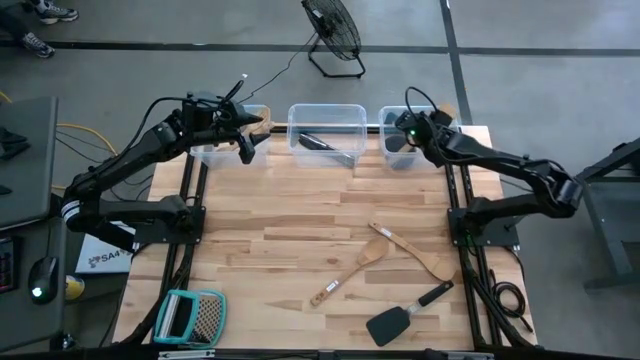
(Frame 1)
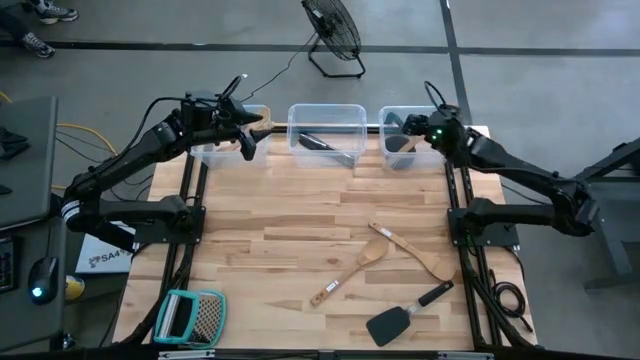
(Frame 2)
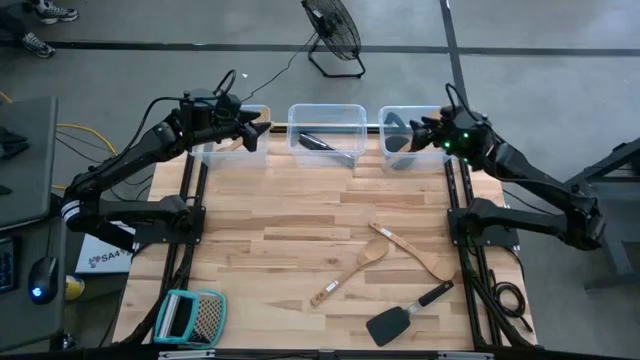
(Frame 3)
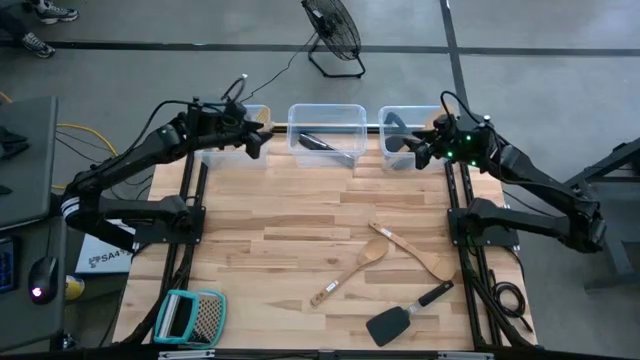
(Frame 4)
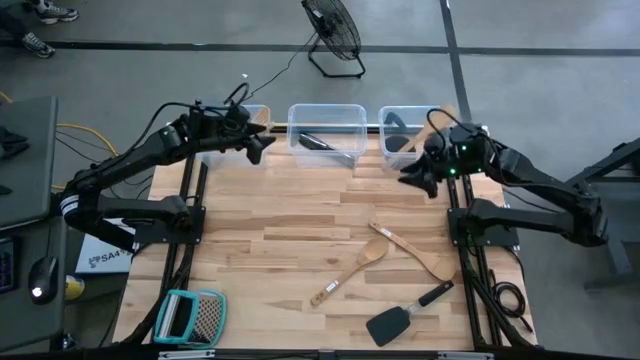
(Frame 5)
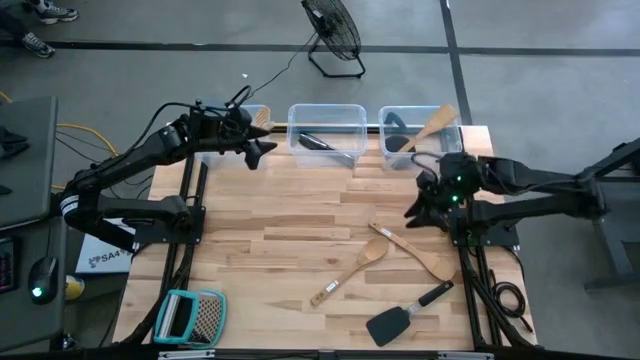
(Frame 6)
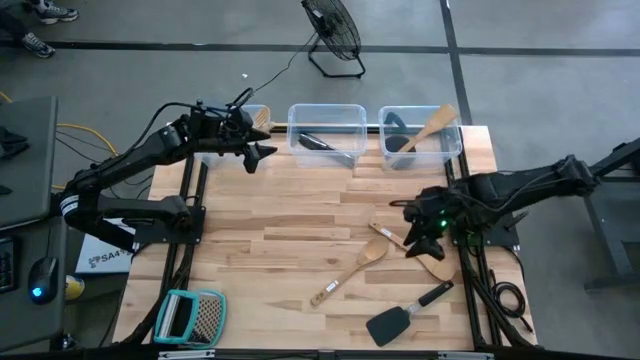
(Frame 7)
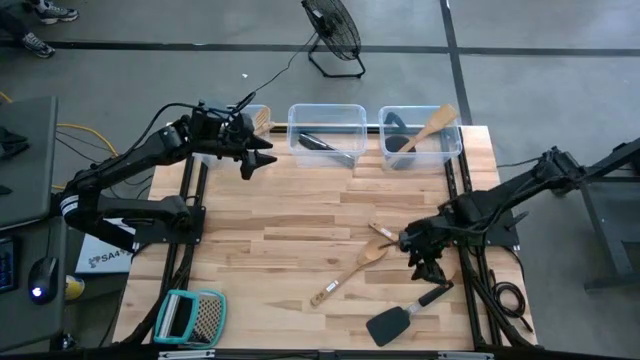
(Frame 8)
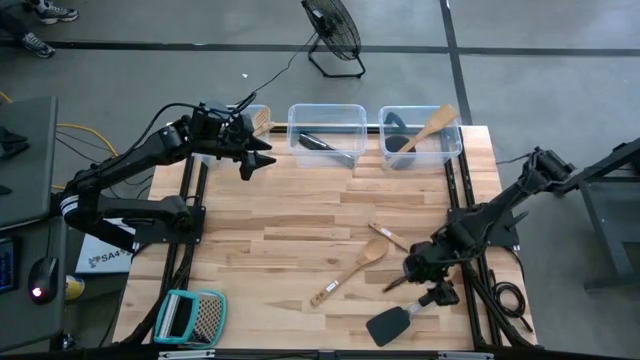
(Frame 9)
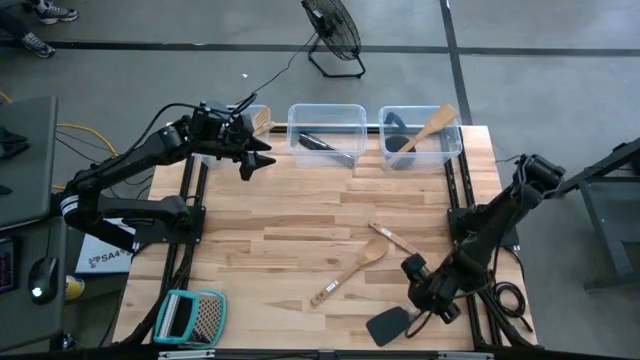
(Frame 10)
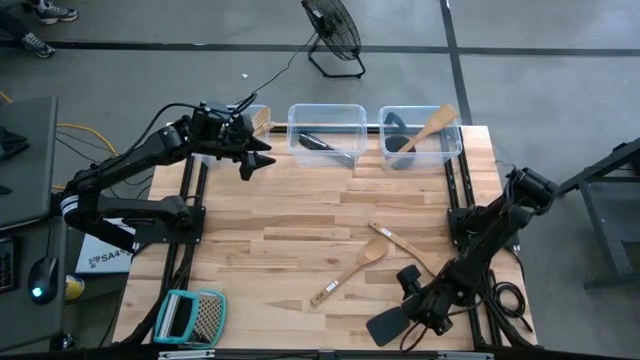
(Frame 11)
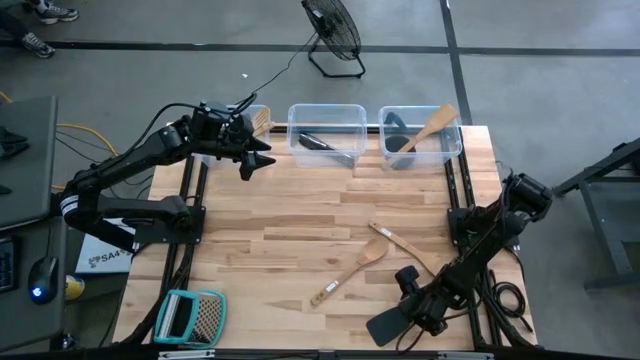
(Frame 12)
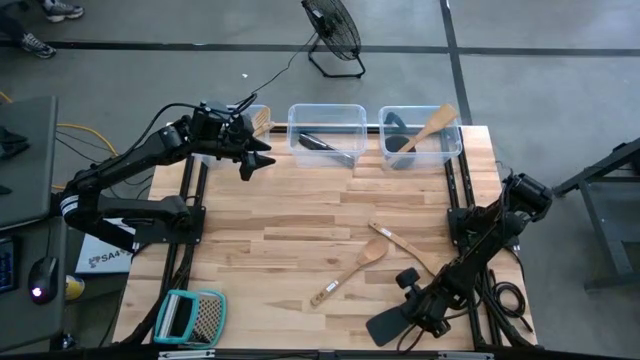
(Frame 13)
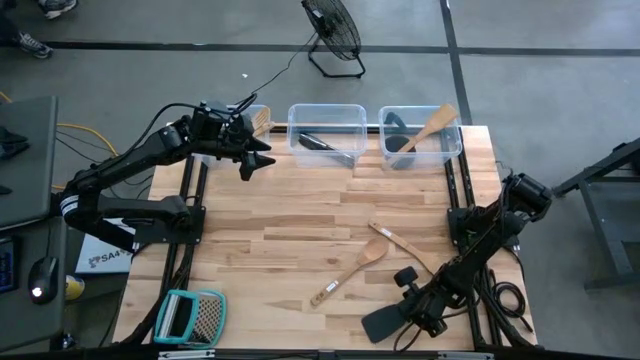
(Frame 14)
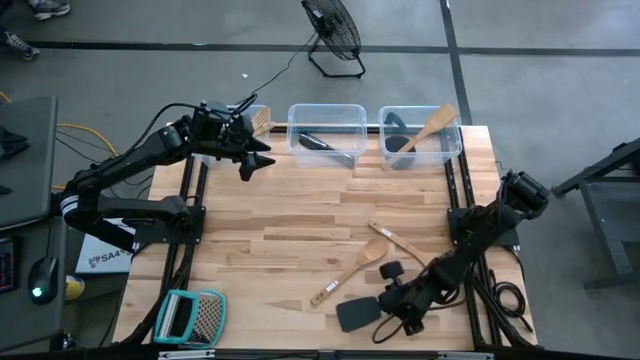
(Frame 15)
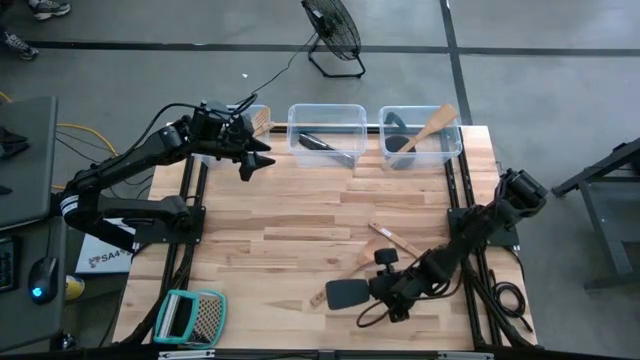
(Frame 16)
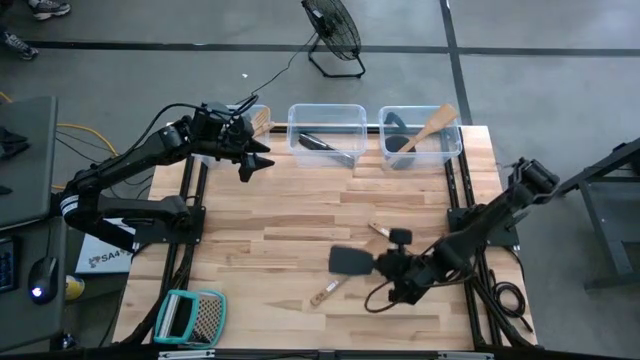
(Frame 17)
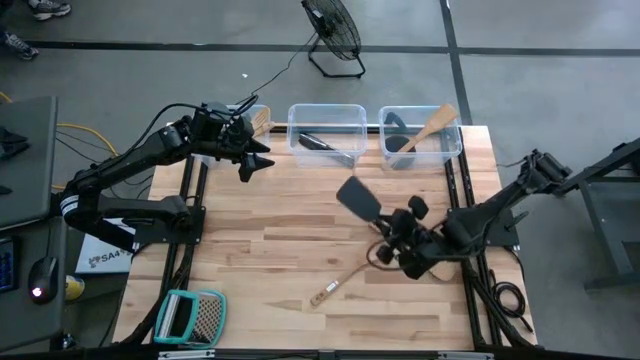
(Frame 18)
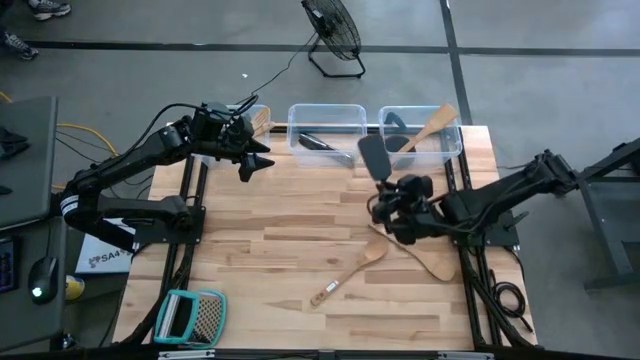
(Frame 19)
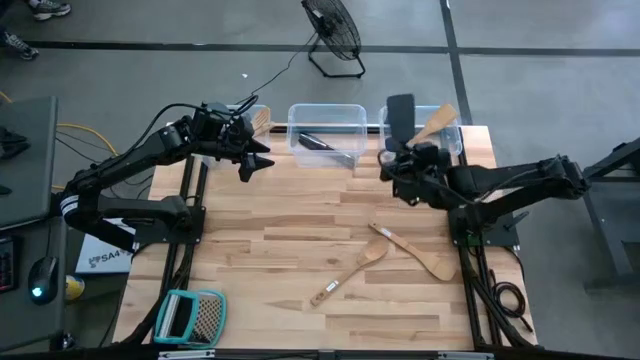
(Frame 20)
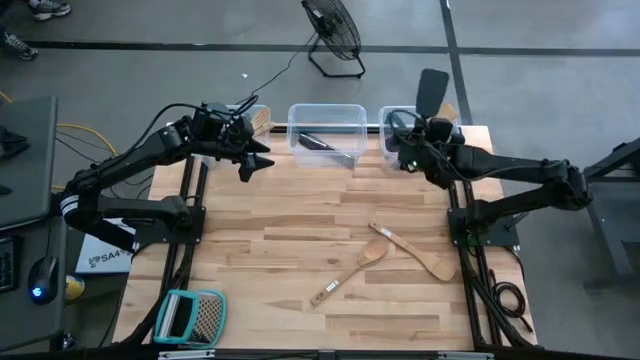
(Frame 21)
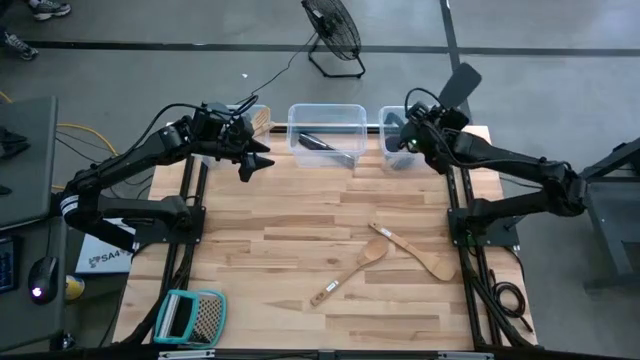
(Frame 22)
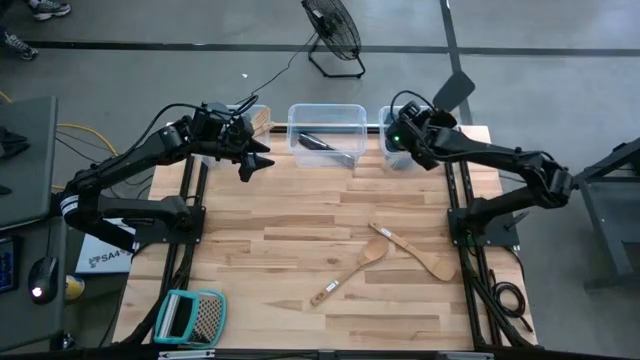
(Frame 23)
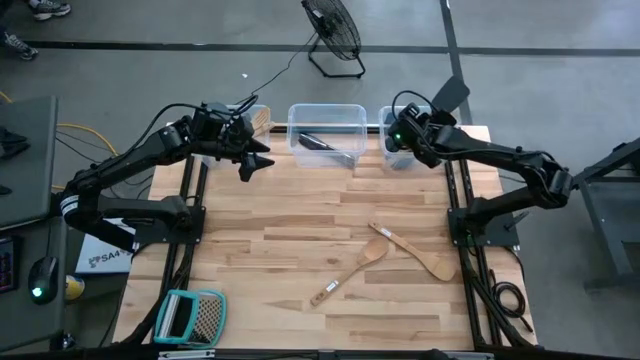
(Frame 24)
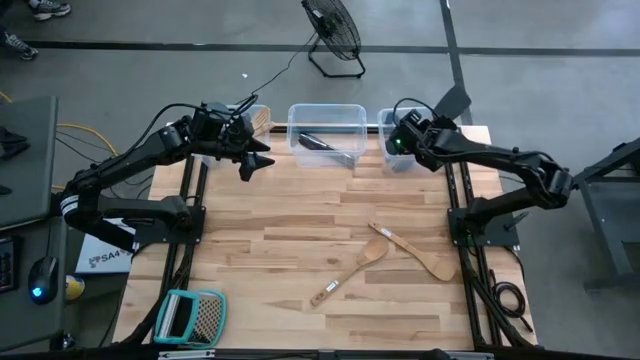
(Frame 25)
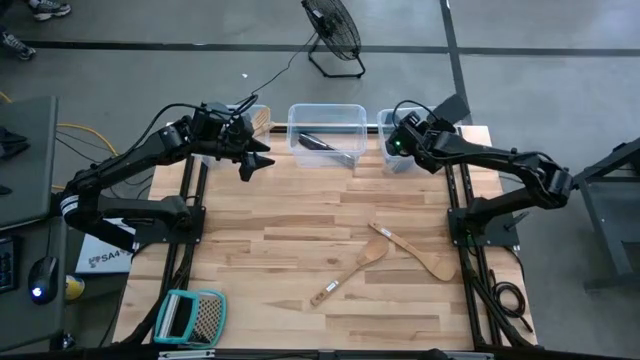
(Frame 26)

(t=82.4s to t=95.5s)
Task: Pick & Place Kitchen Items
Put the black spatula into the right transparent bin

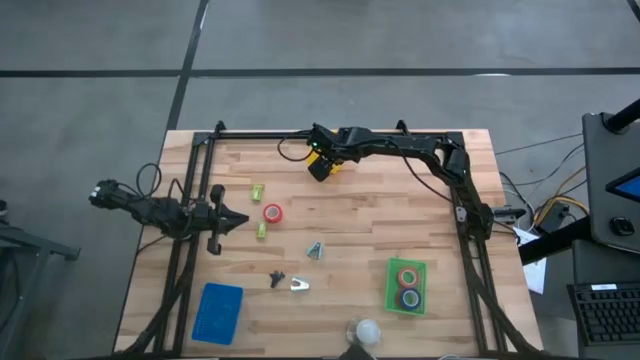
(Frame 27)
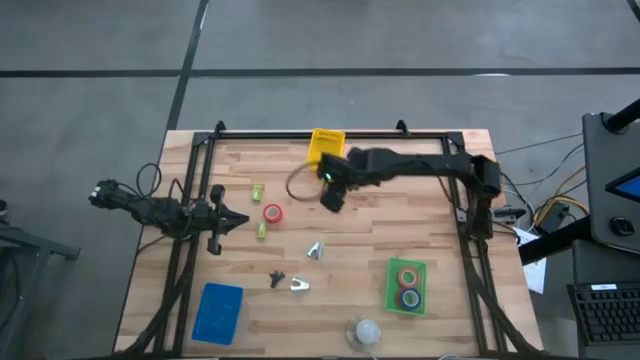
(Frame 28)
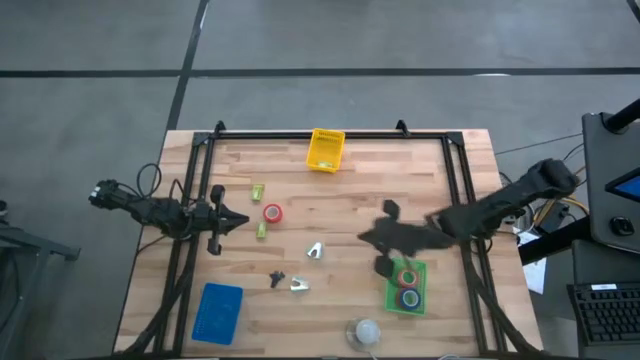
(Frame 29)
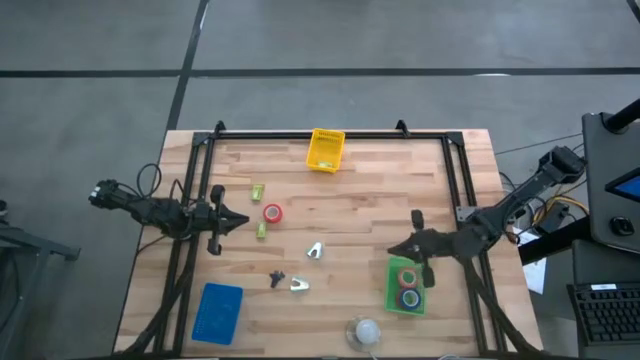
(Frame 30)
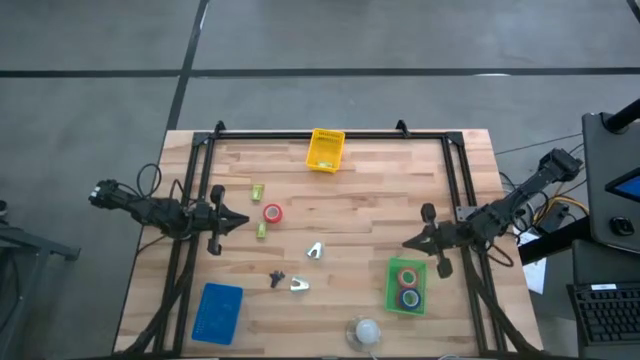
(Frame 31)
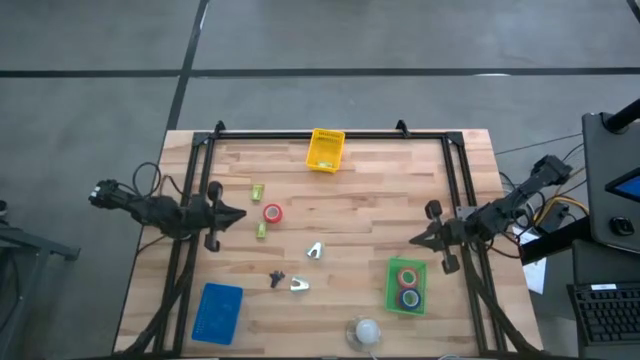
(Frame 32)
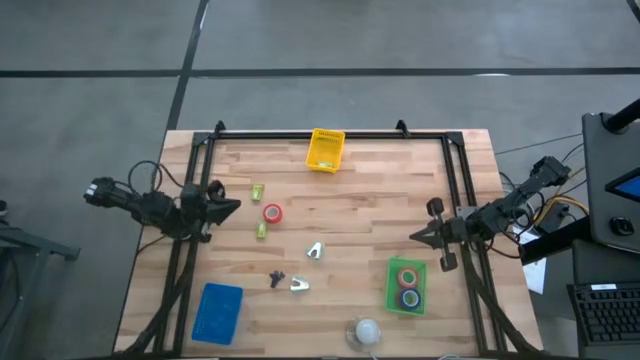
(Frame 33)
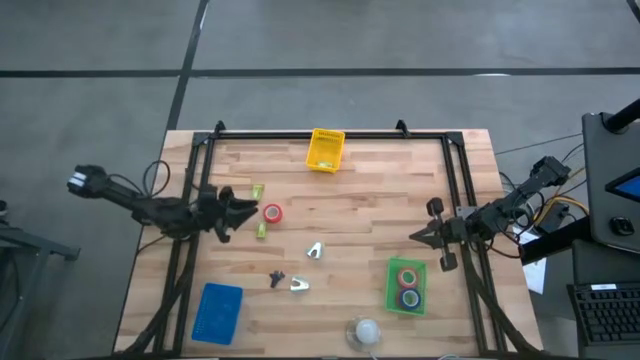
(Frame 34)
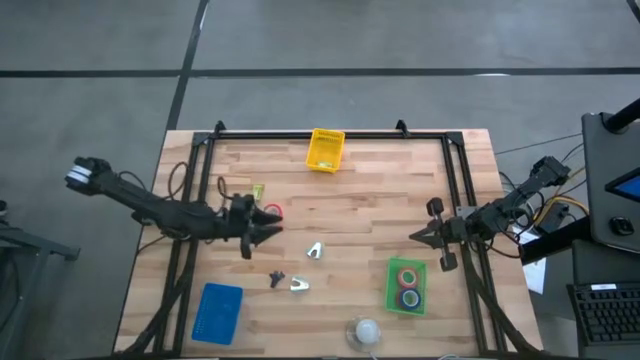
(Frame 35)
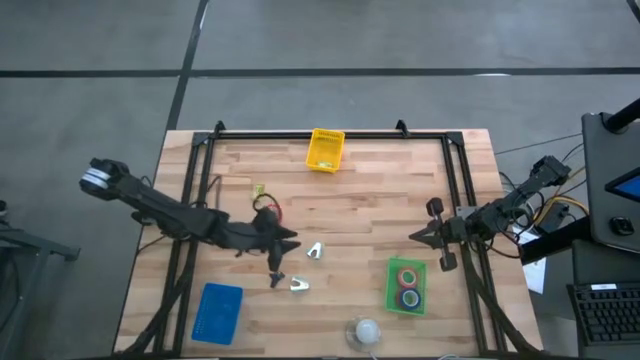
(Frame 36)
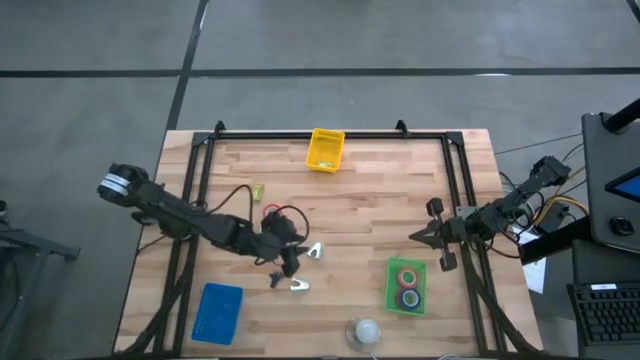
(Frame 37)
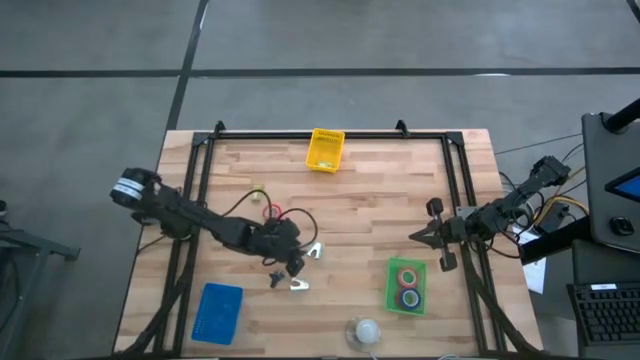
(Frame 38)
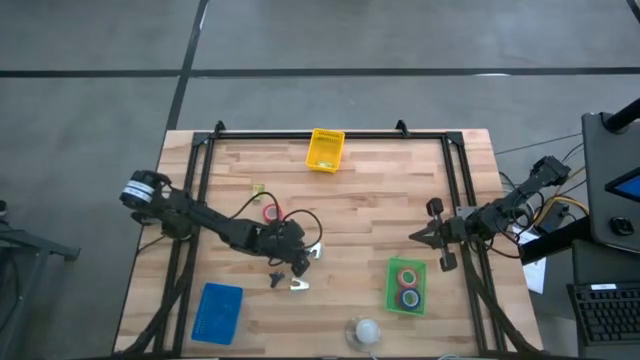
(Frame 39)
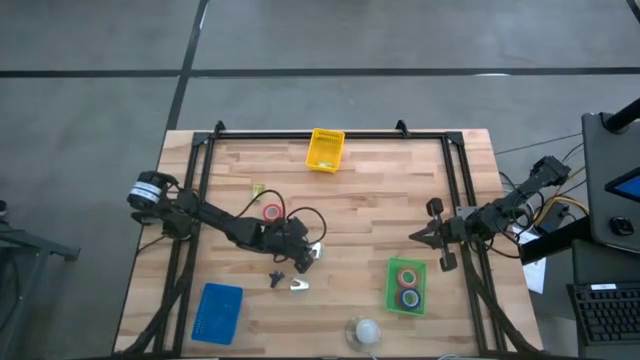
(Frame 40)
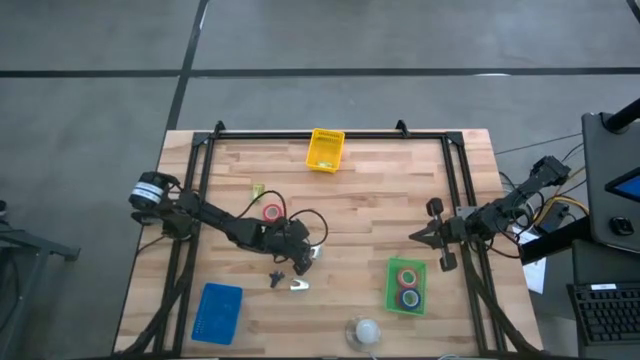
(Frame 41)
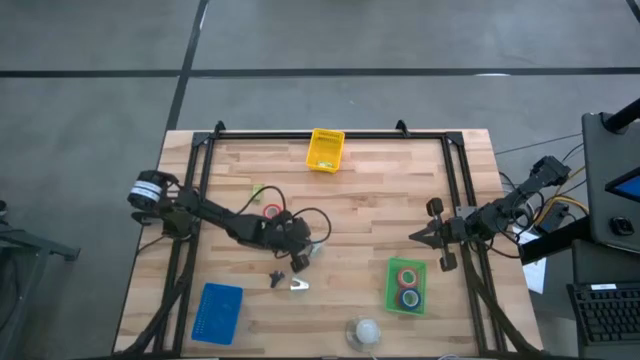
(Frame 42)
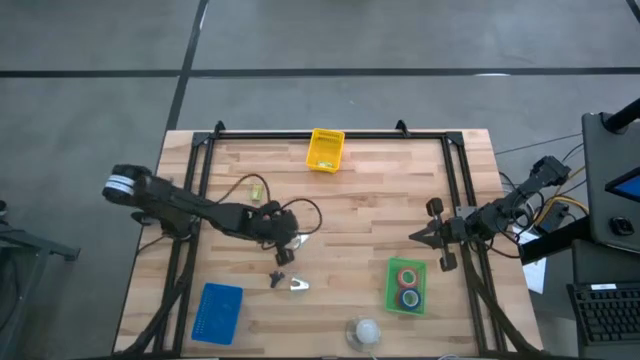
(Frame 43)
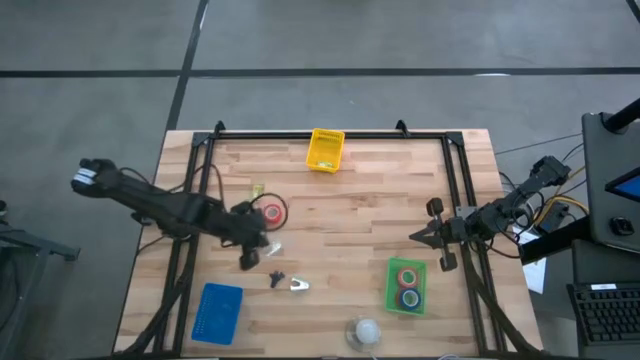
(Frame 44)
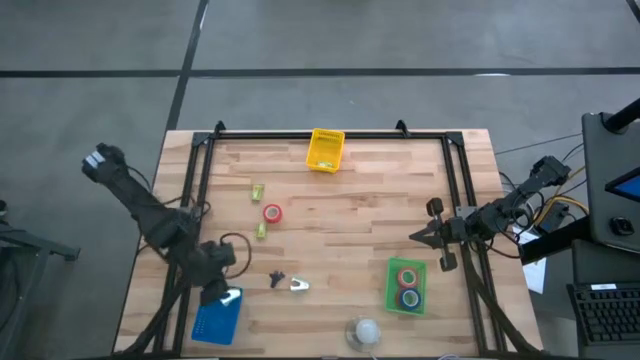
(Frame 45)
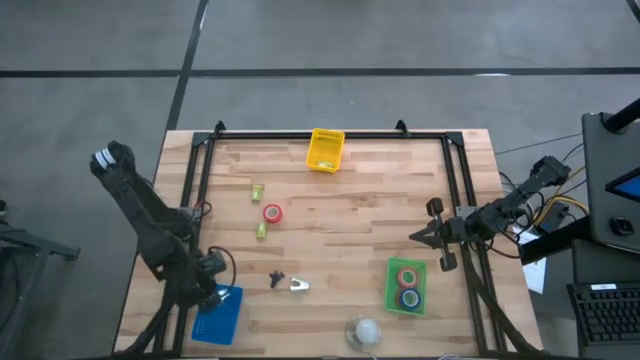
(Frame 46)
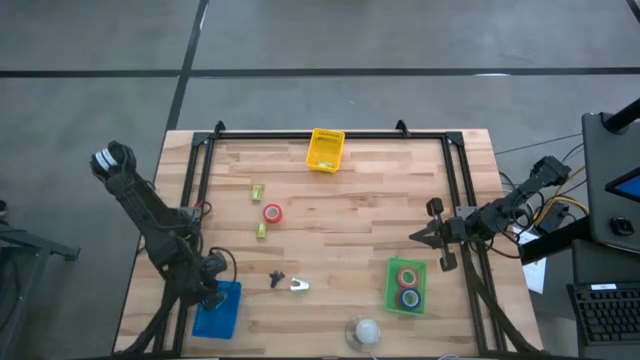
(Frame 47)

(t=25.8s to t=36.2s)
Task: Pick and place Stapler, Stapler remover, tape
Put the top blue staple remover into the blue bin
